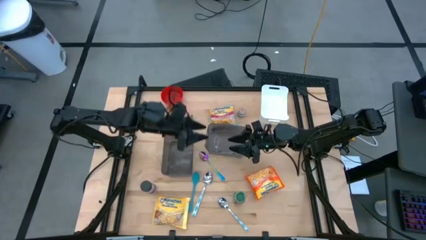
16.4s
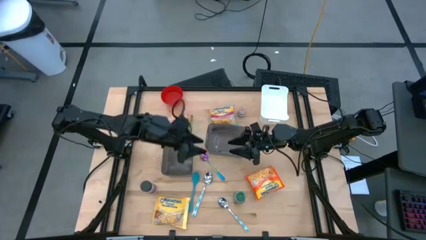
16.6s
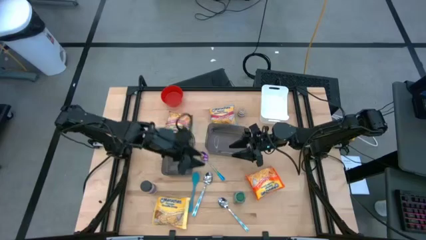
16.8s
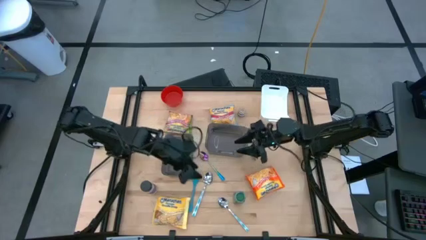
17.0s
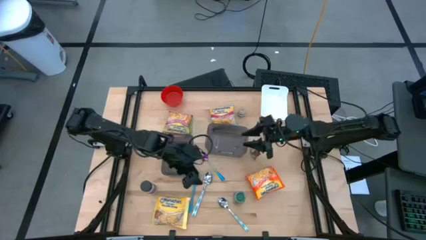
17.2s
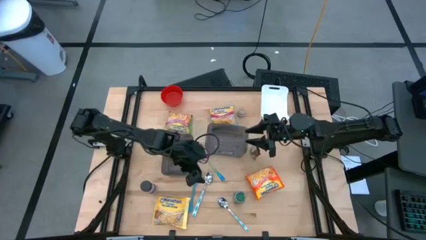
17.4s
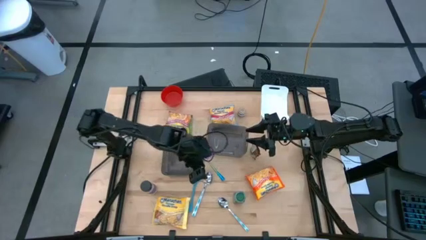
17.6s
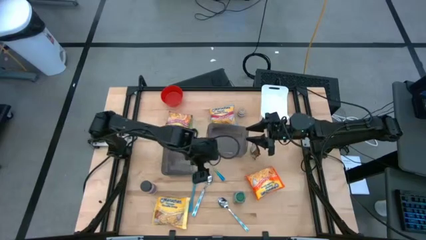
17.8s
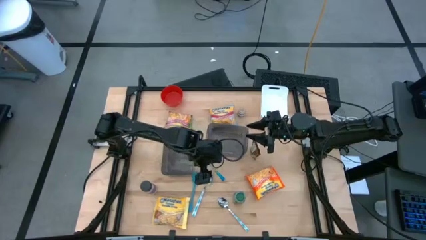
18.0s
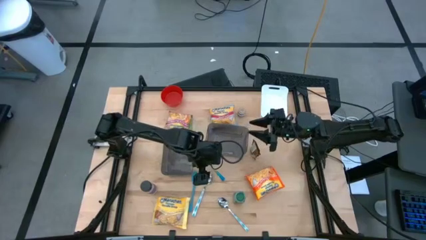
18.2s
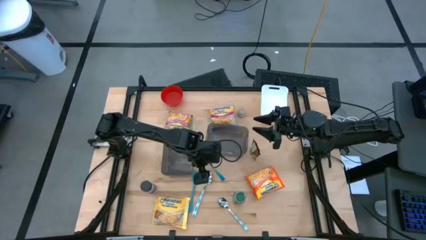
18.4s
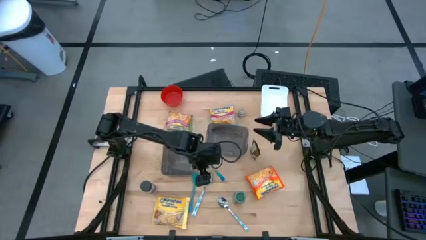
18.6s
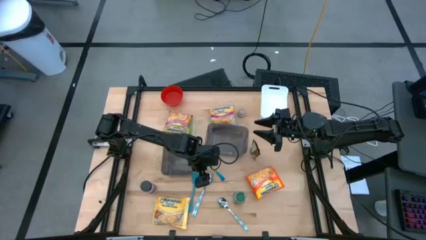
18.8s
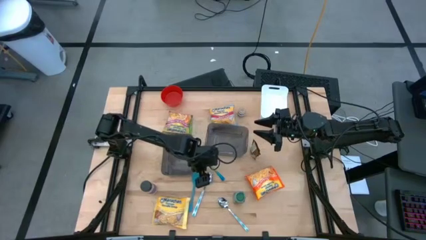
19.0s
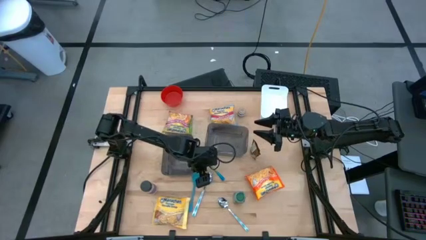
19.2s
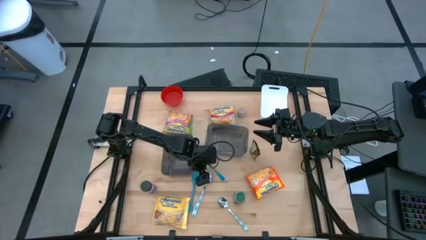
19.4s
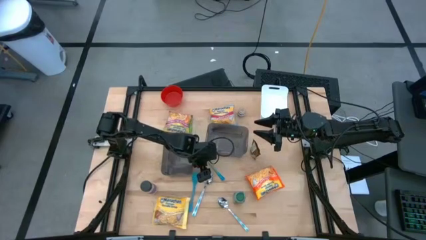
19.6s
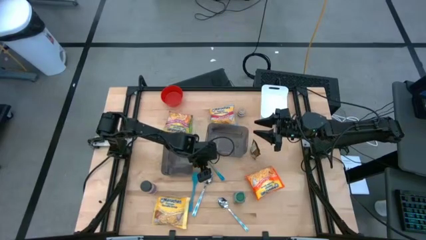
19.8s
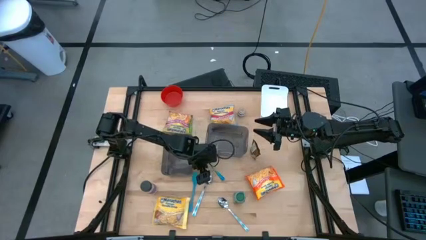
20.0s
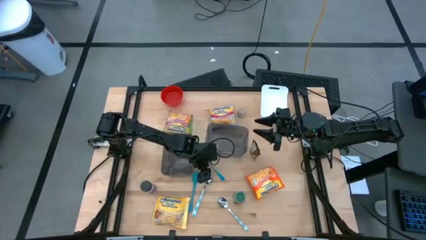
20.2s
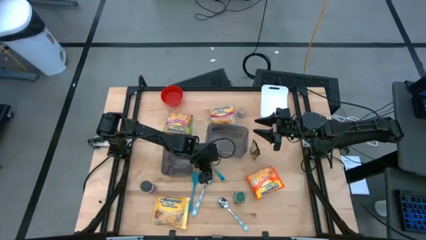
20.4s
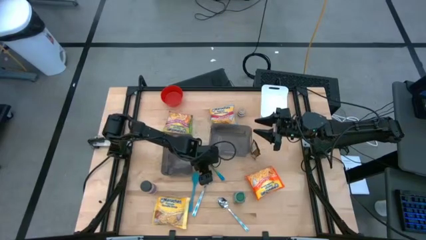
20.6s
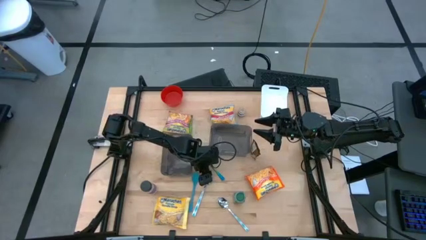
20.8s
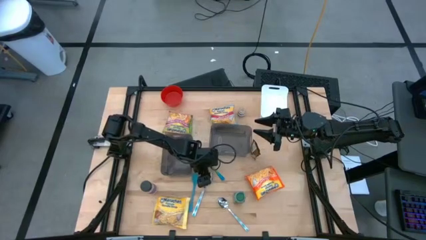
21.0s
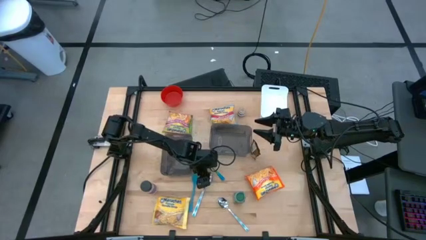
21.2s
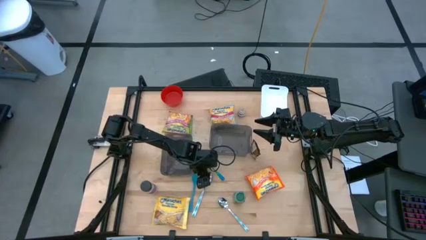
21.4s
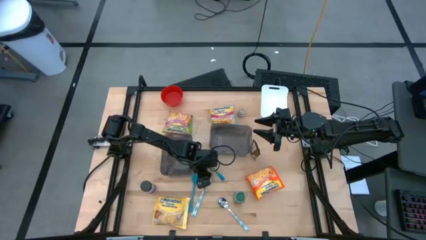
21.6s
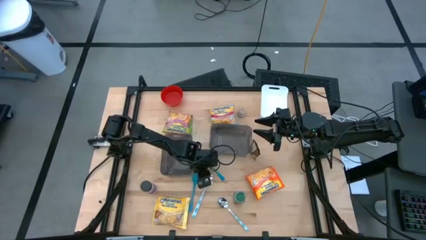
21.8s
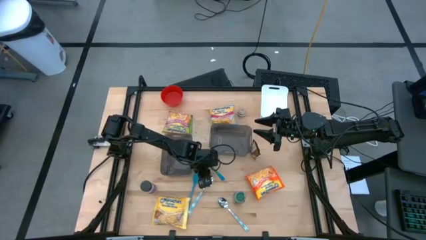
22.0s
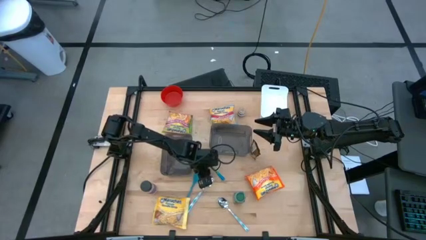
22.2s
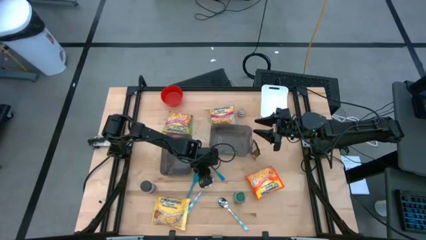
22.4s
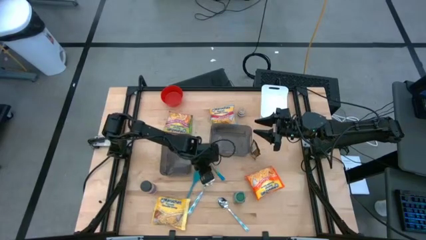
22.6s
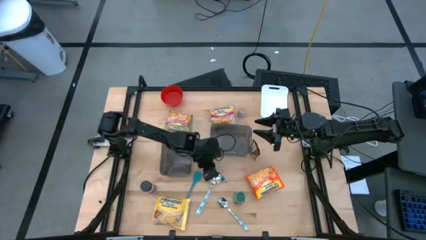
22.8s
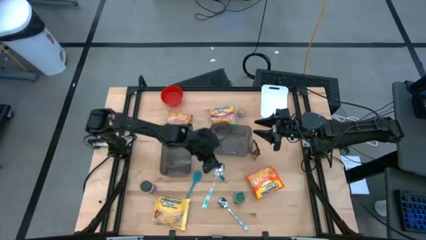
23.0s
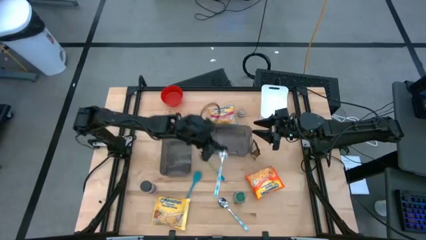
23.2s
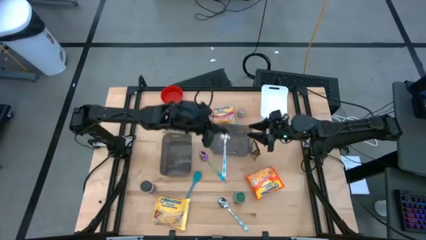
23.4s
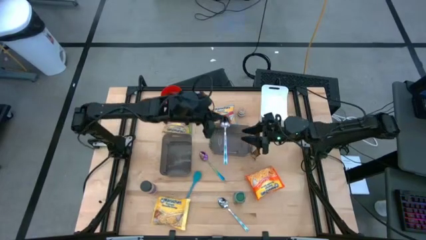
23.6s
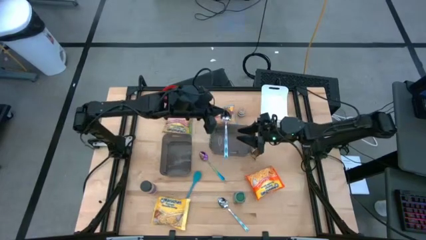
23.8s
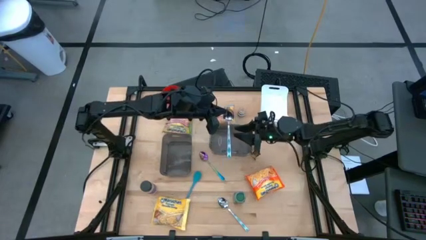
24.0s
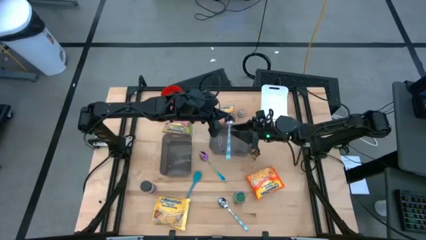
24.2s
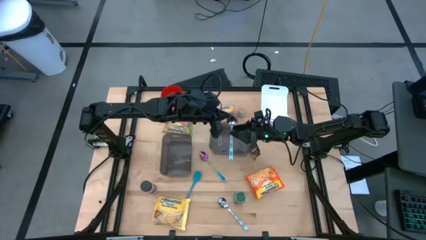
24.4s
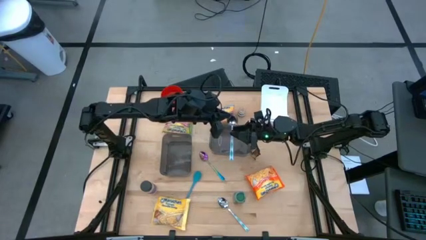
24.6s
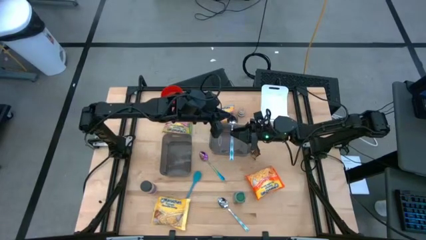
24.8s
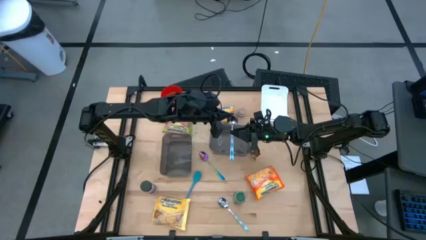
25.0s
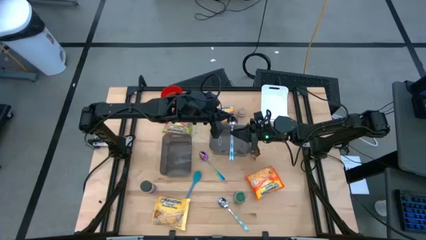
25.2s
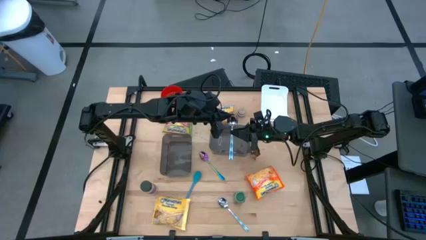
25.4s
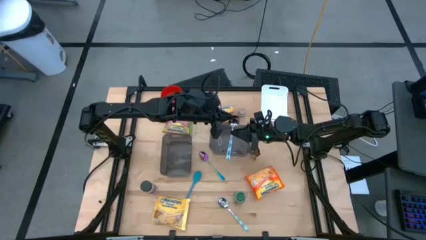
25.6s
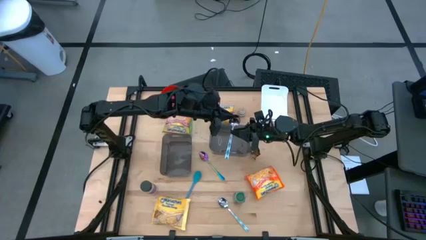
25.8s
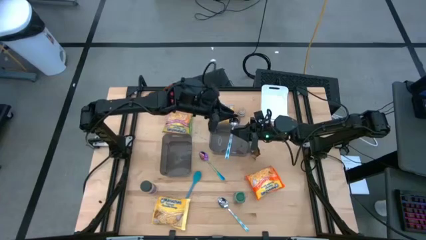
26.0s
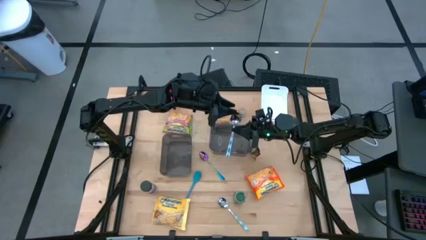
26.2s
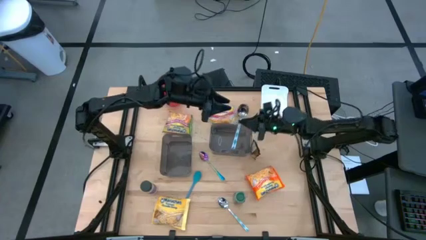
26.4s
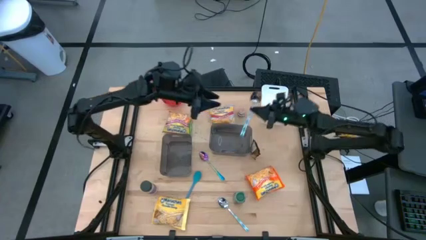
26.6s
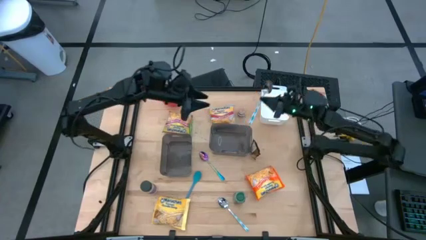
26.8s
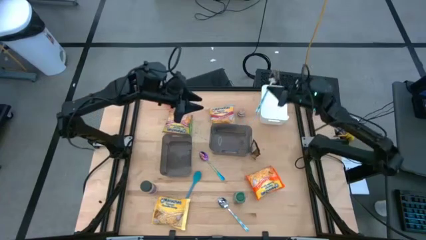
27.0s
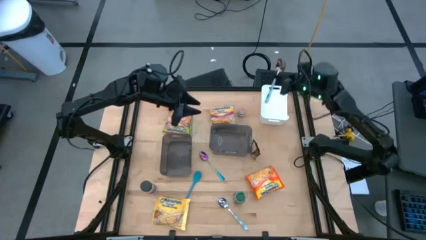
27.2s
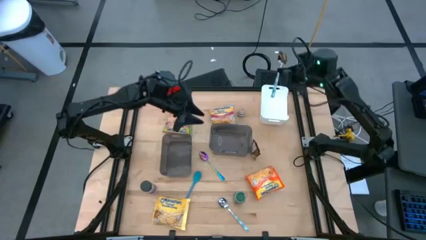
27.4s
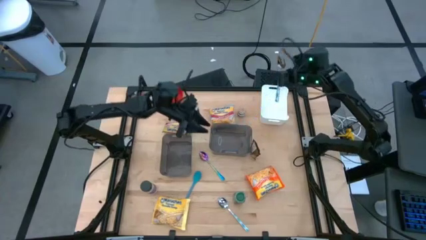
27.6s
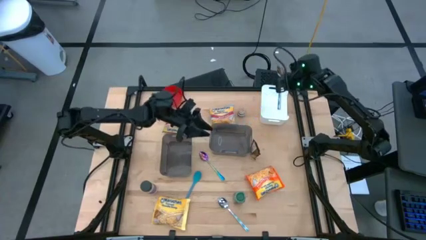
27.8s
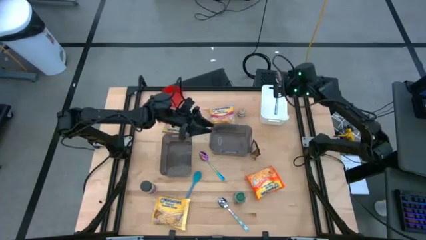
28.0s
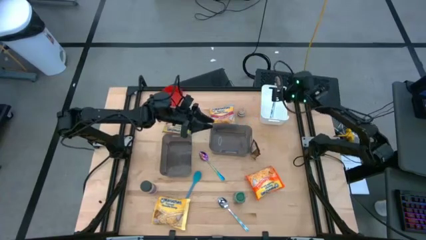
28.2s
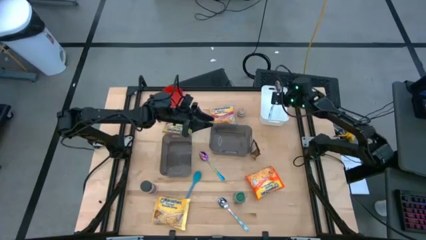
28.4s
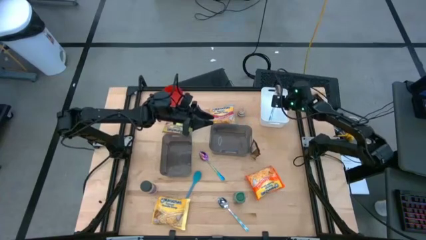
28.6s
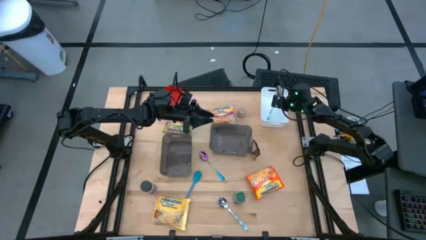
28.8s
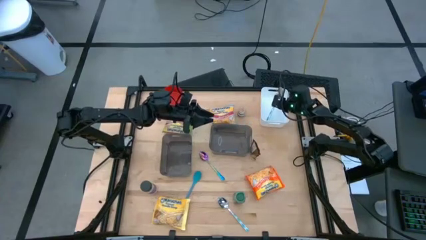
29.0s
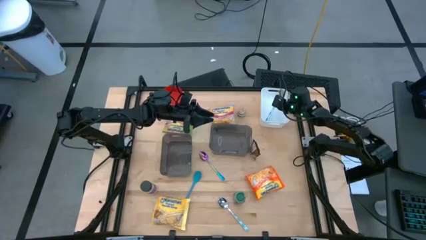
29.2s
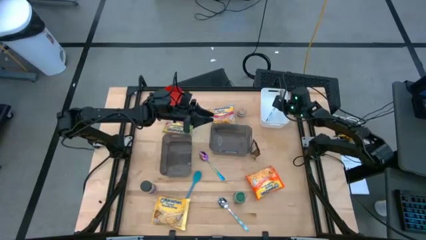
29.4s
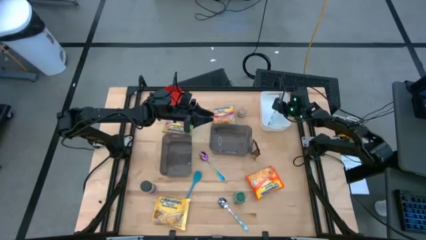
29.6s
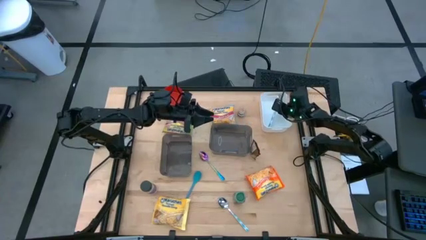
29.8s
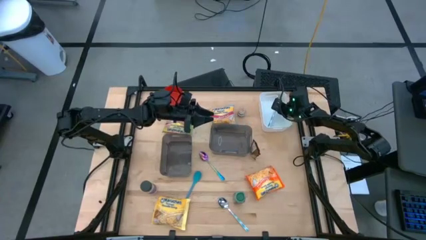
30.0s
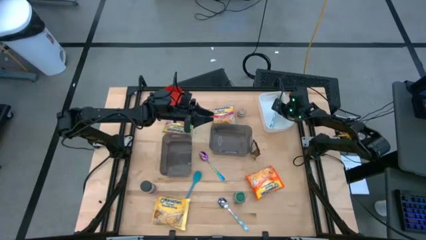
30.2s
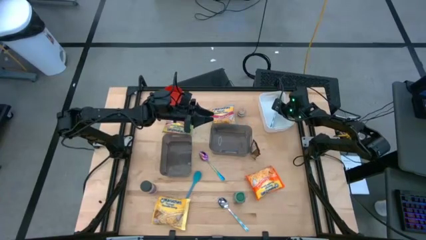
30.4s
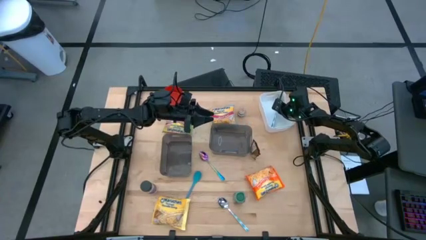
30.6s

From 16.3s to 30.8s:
Task: Pick & Place Food Item
Put the top blue patterned spoon into the white bin
